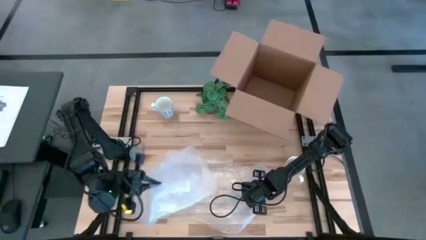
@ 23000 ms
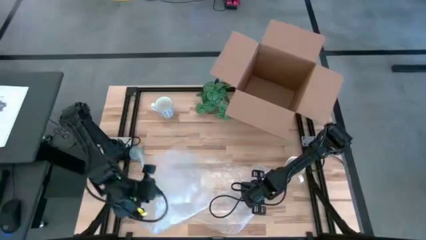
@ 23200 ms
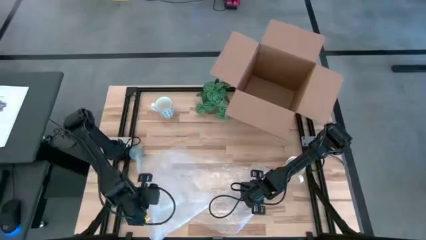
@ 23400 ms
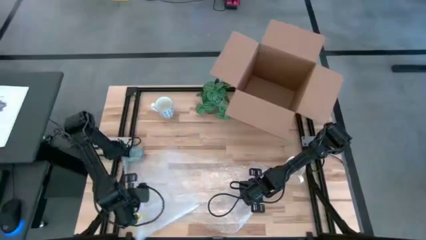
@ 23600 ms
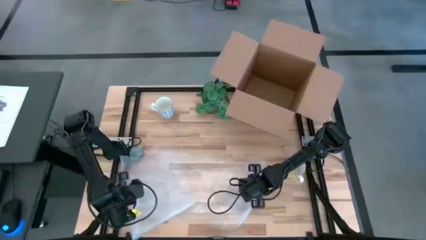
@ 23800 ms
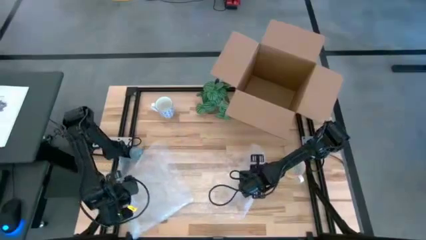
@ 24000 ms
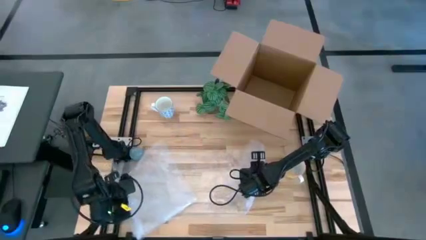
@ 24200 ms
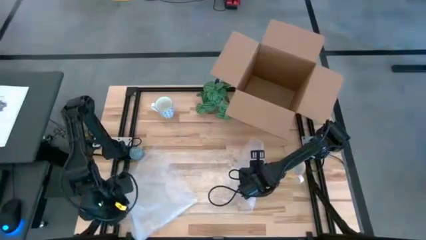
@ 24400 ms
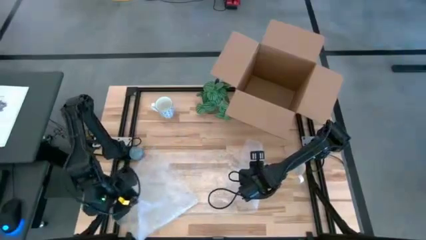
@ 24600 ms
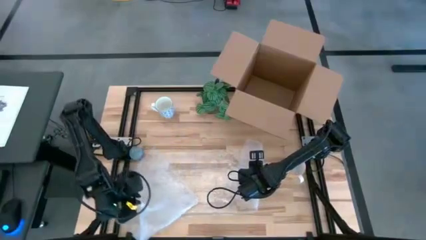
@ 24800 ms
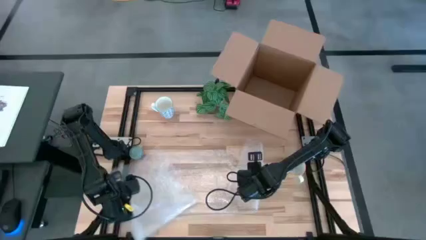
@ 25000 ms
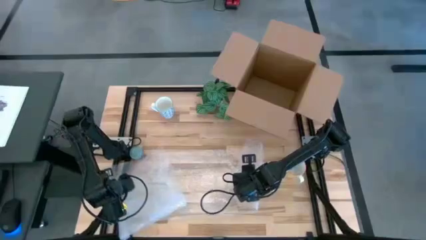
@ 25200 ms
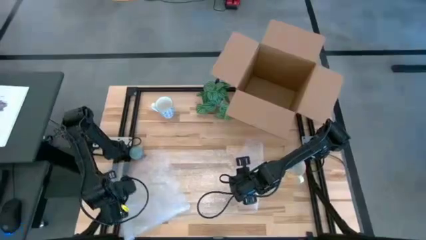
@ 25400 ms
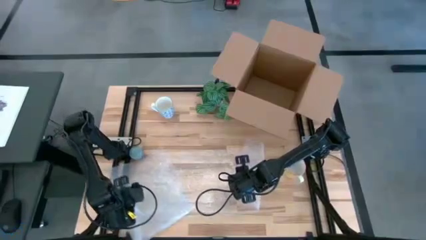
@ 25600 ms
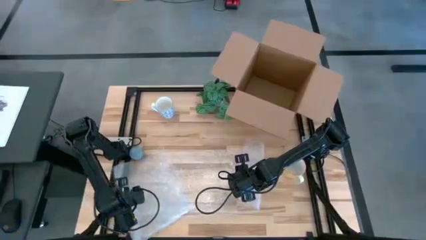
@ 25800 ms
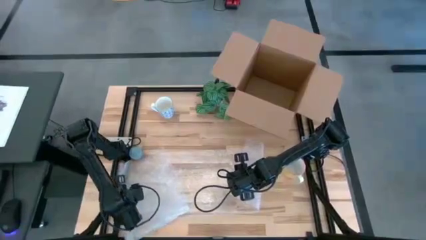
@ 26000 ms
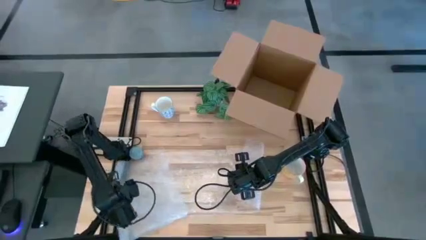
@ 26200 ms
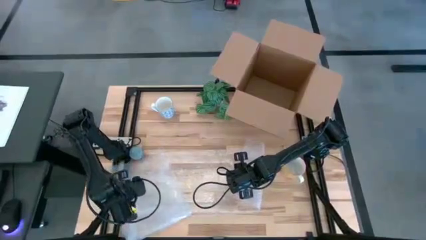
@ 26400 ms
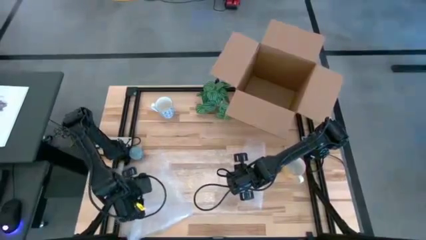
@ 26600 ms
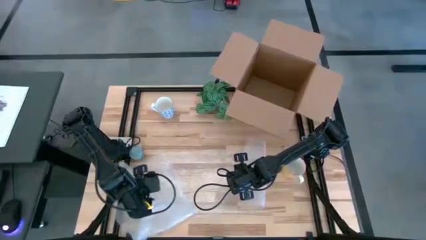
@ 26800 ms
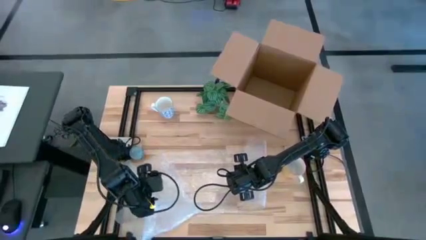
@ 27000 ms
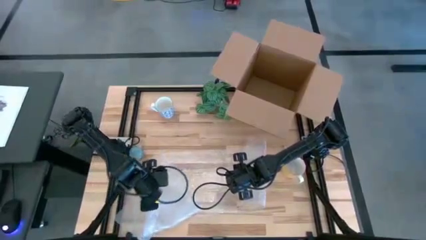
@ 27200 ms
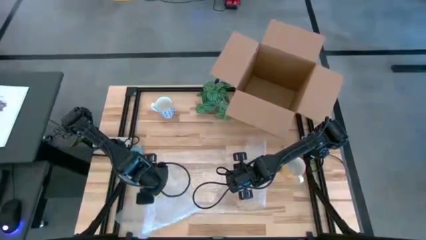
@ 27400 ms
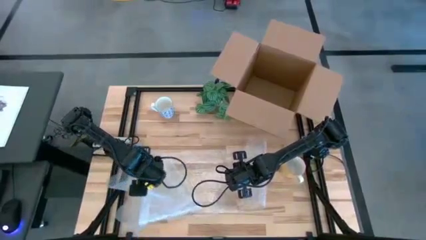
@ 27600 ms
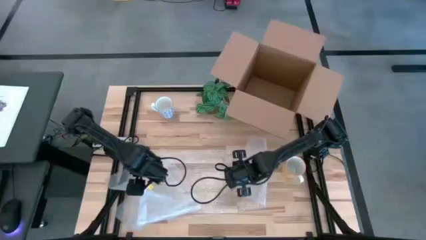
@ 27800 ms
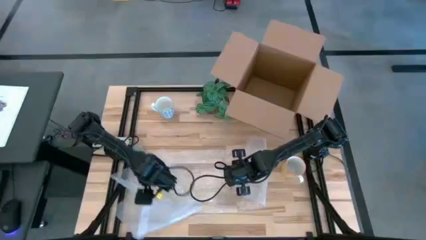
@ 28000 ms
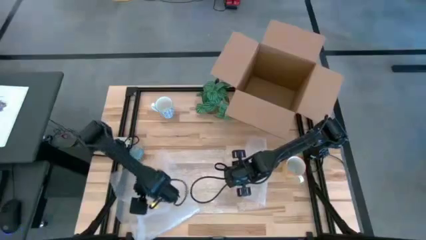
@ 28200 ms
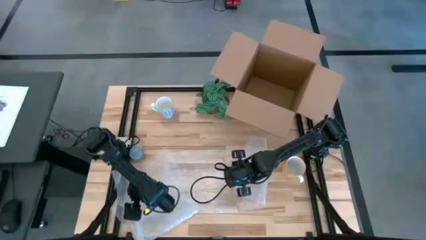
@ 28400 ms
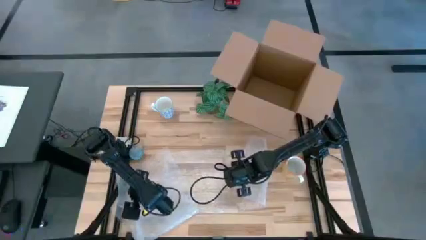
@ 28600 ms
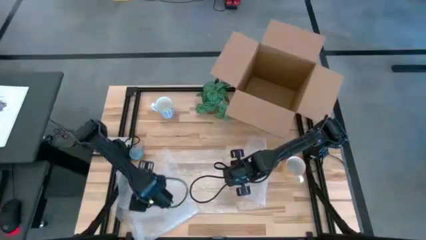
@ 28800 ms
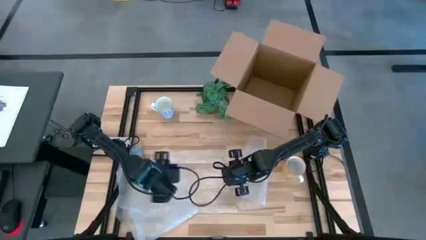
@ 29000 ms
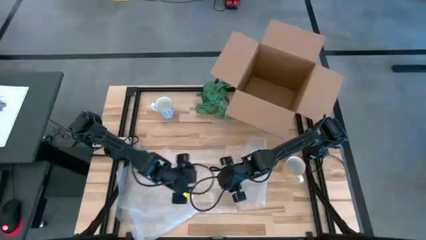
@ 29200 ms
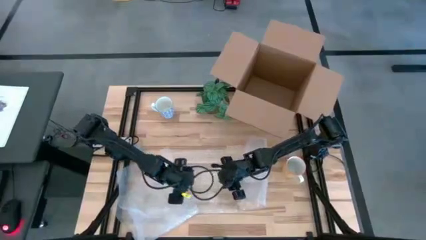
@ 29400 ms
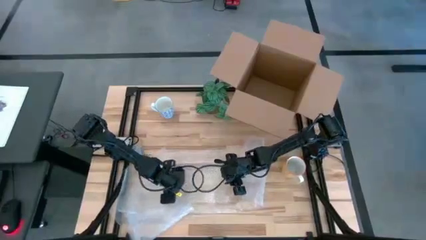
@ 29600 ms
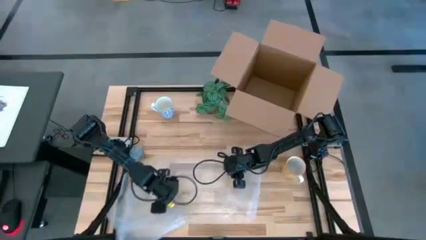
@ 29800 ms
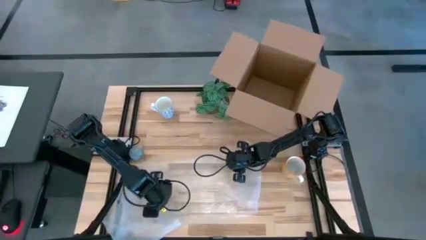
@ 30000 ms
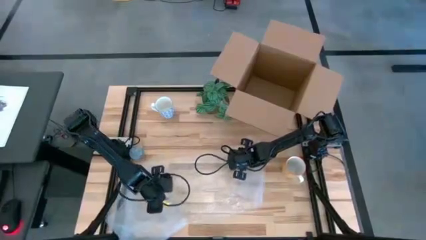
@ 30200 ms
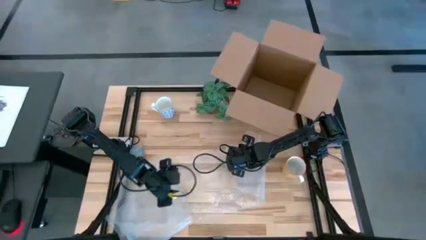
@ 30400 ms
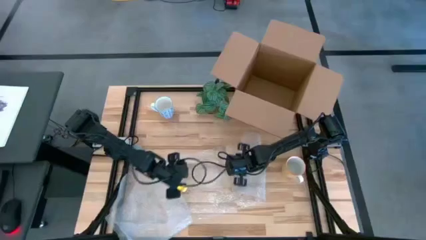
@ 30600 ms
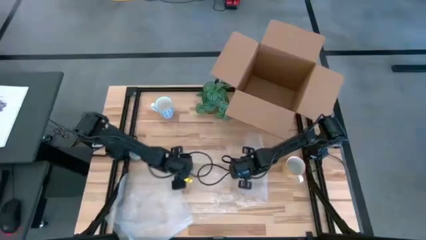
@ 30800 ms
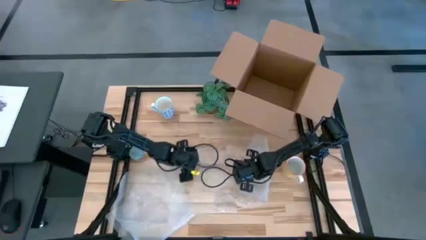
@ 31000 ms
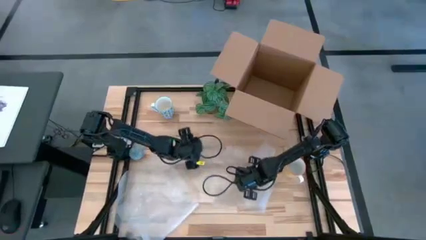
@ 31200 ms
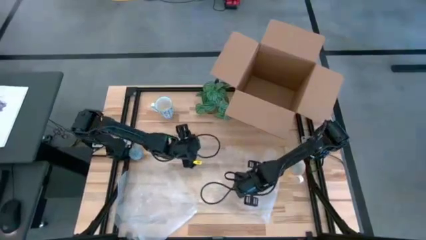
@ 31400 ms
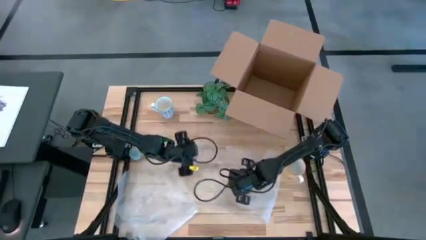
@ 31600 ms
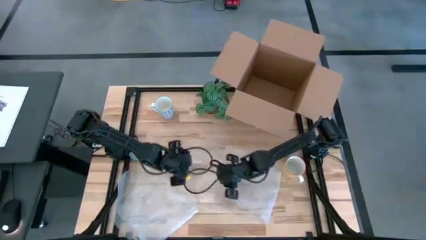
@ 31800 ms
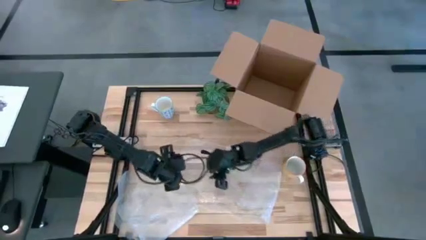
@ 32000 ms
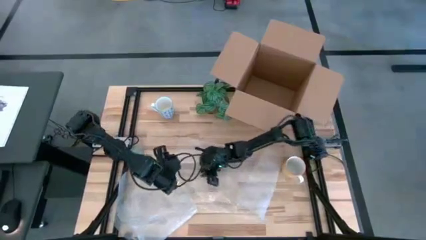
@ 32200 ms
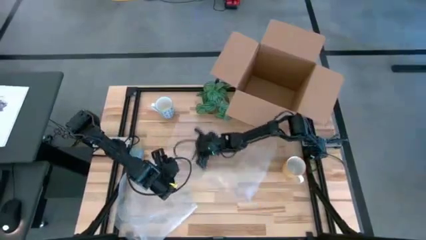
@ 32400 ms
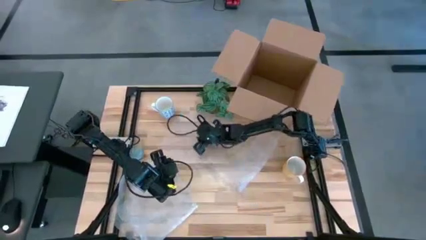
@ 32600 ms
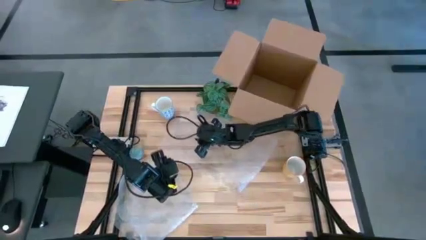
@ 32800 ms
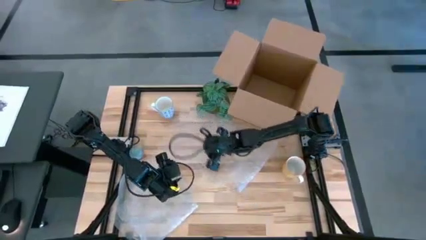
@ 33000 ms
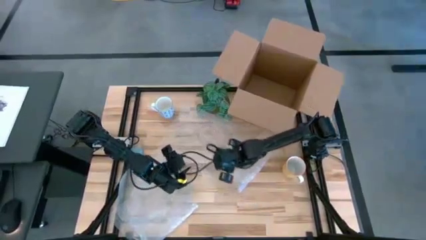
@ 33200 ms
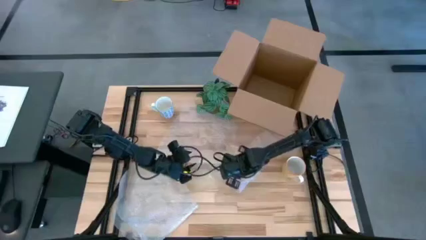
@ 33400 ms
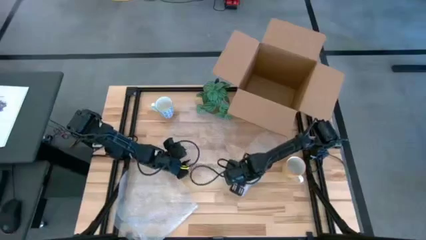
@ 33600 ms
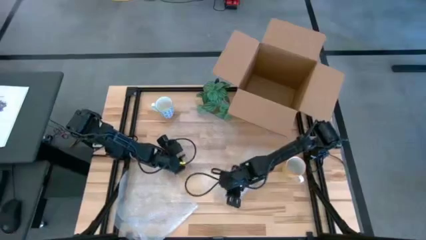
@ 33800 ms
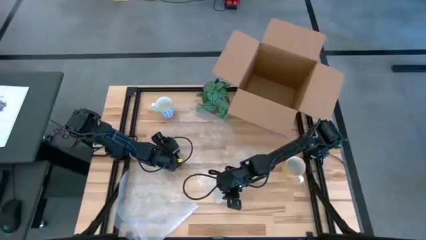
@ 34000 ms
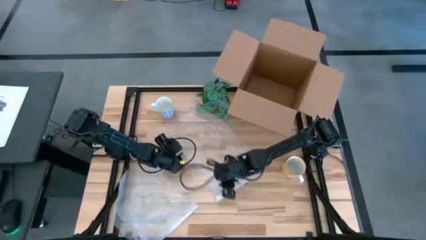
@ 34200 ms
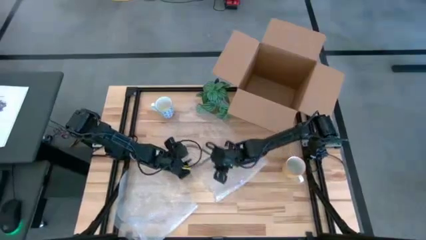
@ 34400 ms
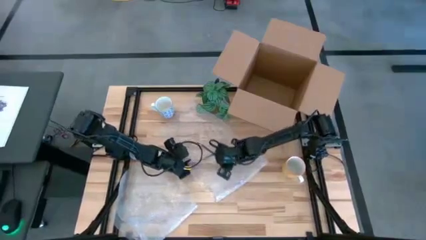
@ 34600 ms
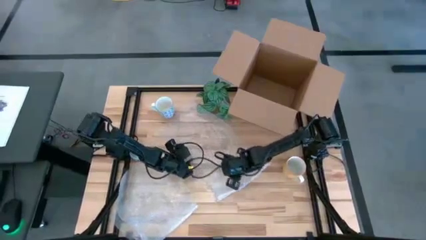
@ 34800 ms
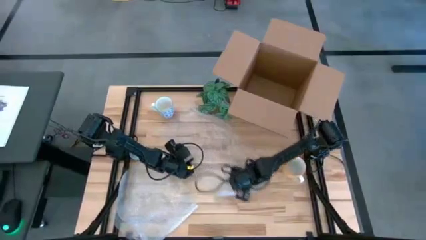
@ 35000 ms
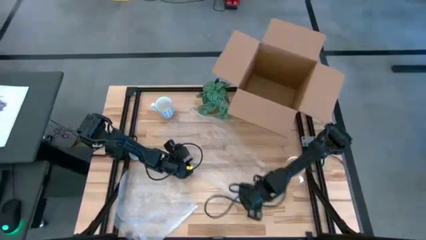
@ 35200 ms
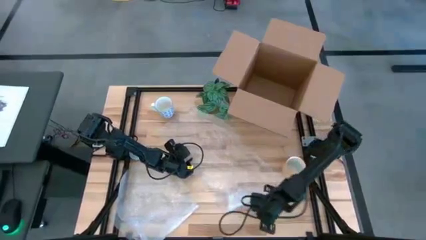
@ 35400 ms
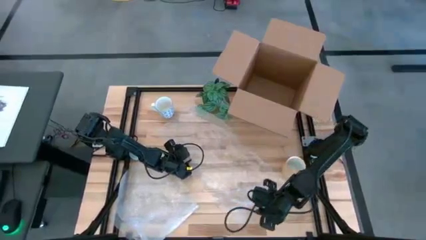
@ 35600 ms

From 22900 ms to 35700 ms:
Task: wrap mug
Prepare the bubble wrap
